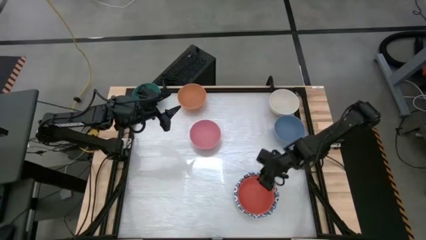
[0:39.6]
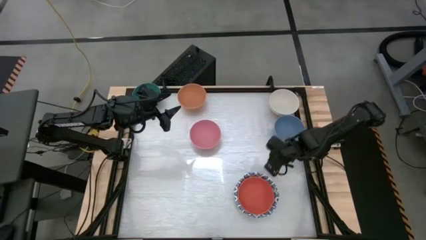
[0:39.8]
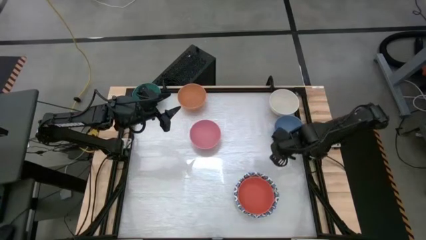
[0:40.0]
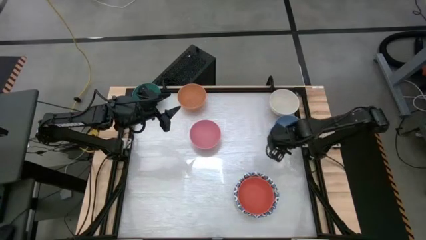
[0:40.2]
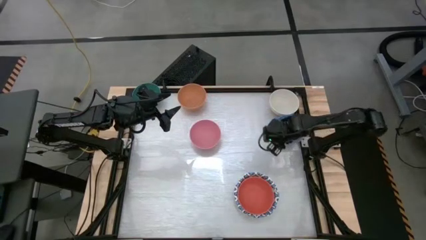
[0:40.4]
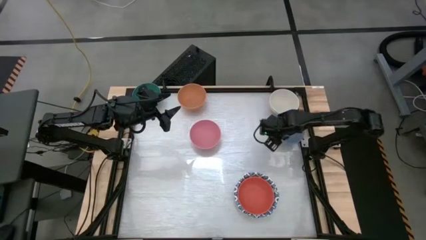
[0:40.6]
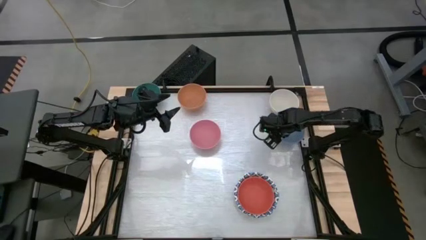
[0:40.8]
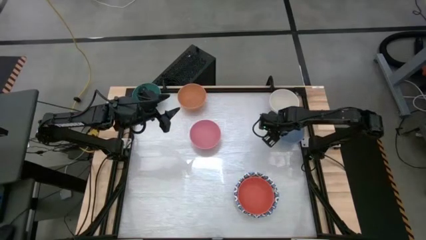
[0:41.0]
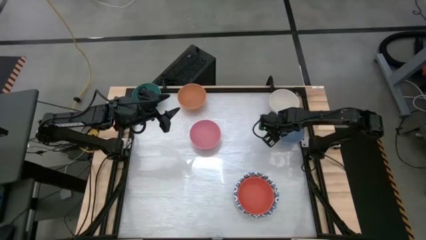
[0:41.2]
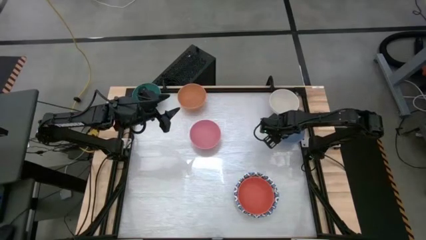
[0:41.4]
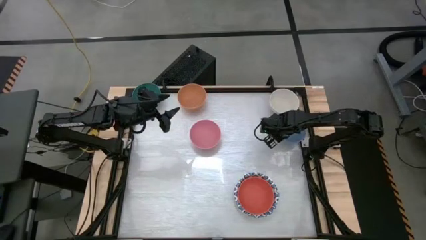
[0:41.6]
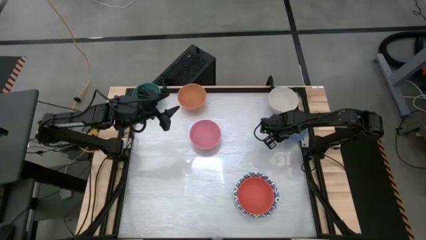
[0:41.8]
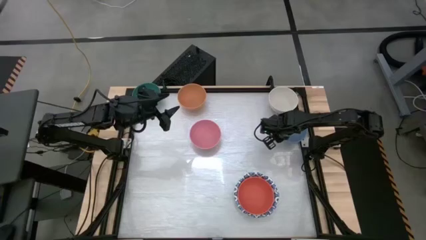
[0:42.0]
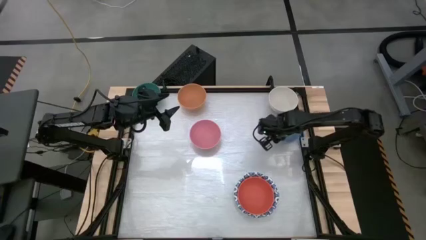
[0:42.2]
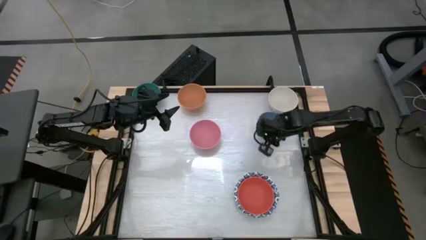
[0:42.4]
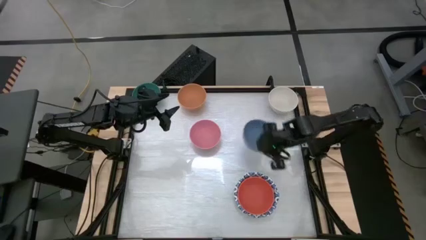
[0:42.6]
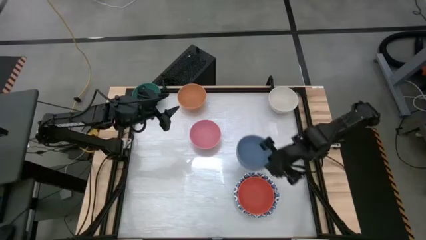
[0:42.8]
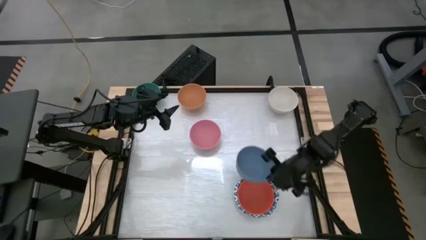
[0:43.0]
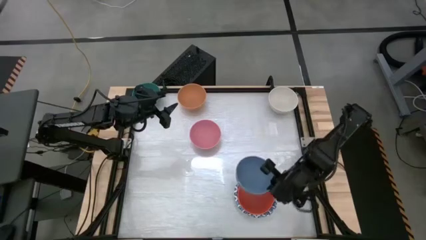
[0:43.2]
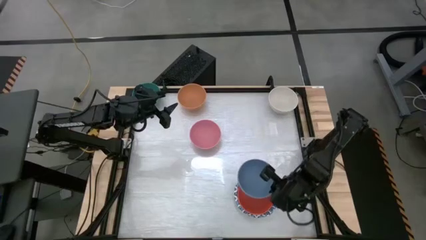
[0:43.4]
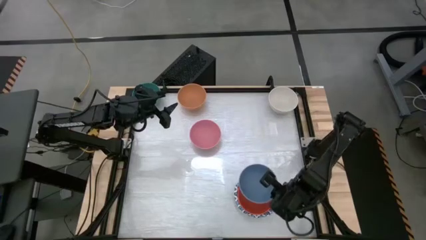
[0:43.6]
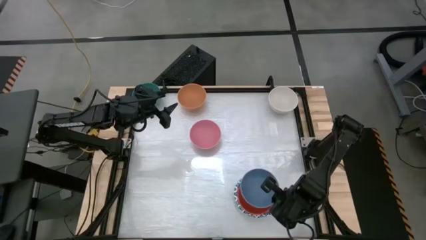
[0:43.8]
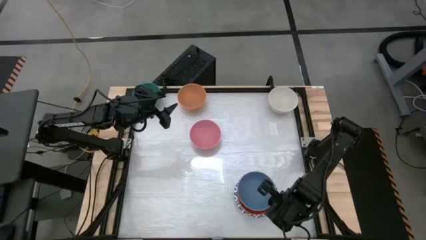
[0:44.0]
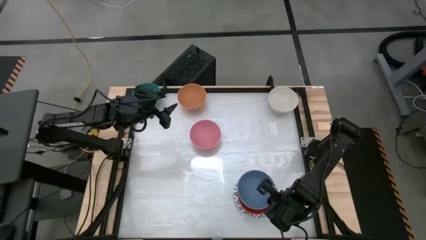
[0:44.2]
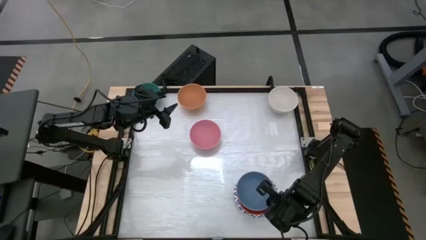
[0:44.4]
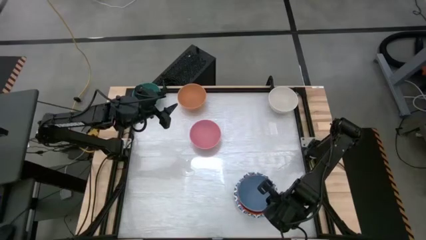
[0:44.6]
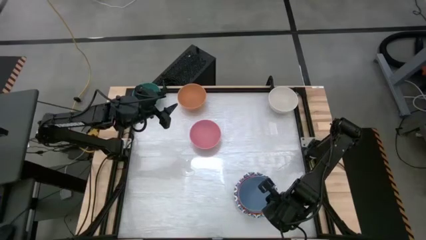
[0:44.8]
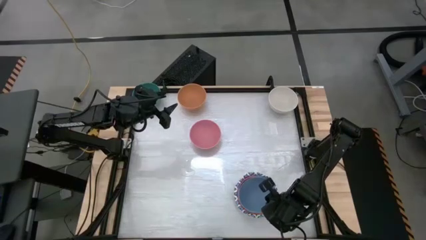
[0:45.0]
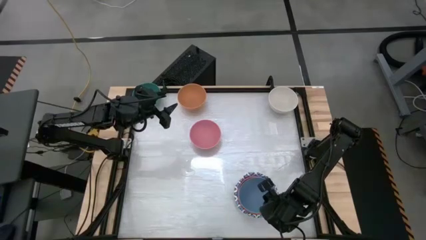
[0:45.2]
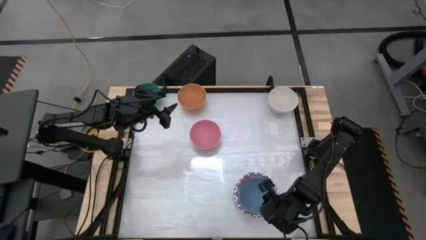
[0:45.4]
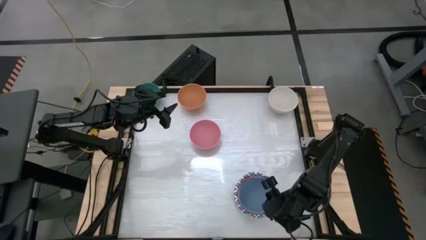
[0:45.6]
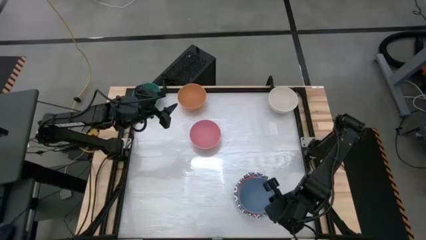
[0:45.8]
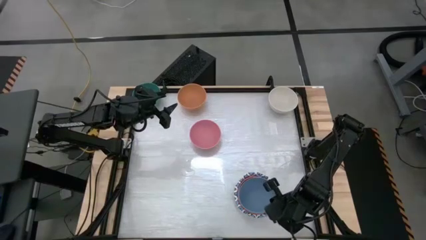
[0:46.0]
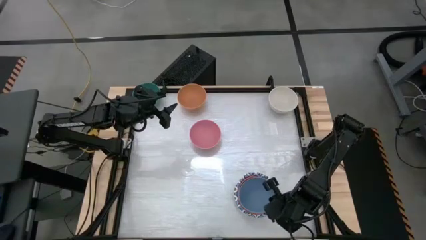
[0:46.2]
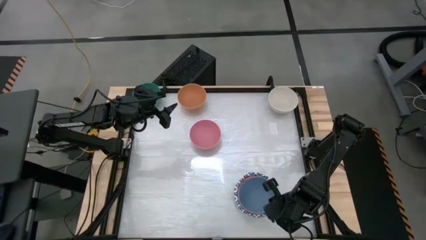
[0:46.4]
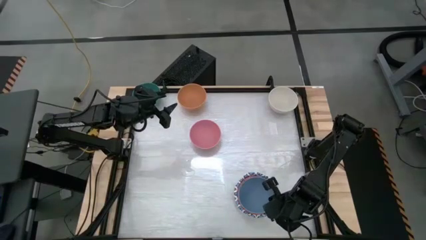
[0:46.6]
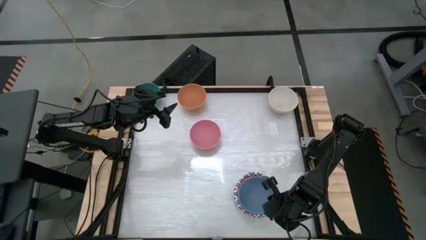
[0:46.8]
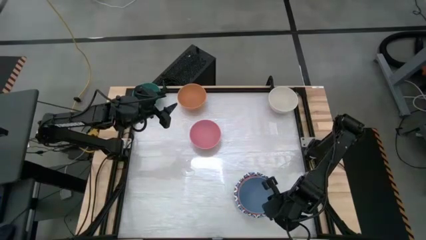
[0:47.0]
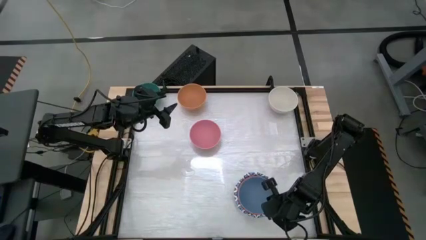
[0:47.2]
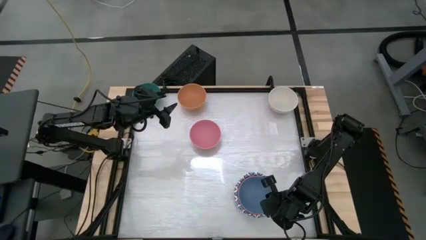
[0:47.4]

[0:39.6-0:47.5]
Stack the blue bowl on top of the red bowl
